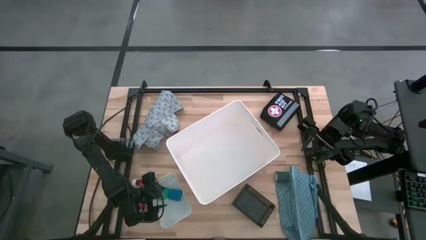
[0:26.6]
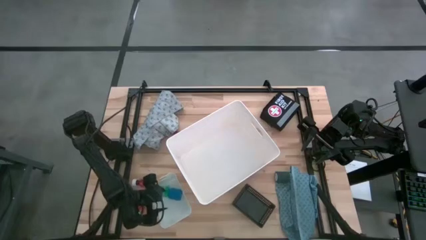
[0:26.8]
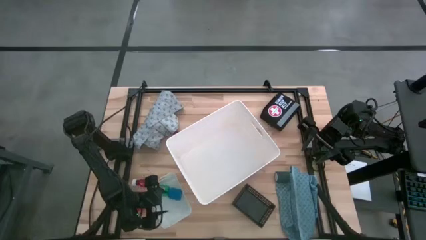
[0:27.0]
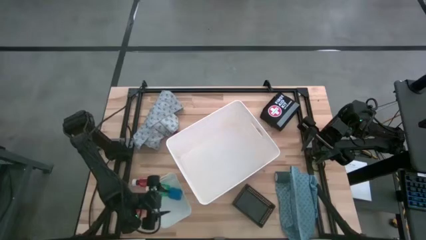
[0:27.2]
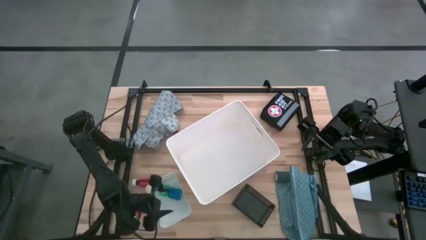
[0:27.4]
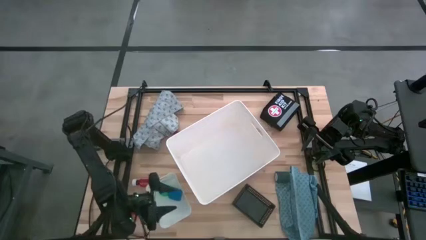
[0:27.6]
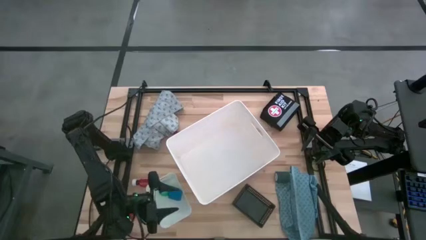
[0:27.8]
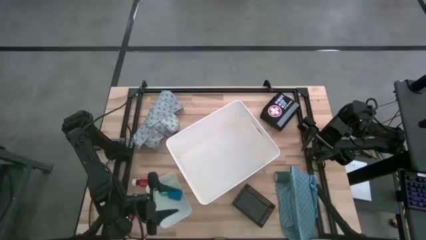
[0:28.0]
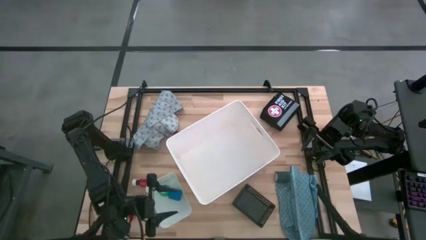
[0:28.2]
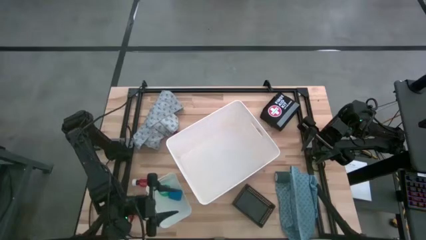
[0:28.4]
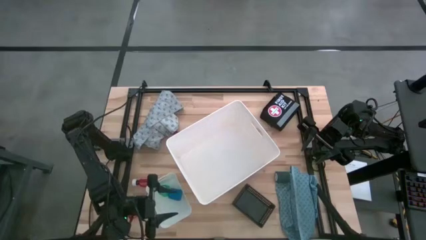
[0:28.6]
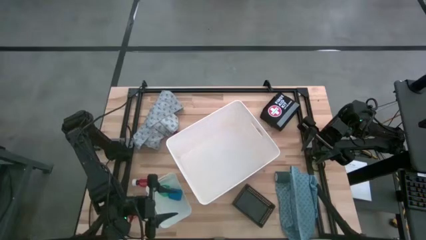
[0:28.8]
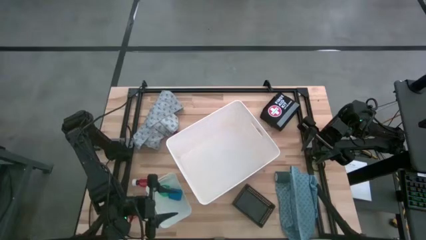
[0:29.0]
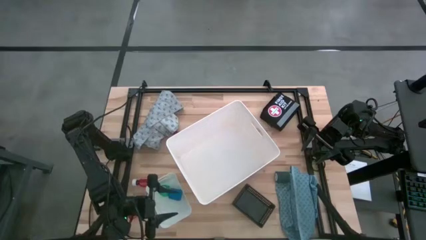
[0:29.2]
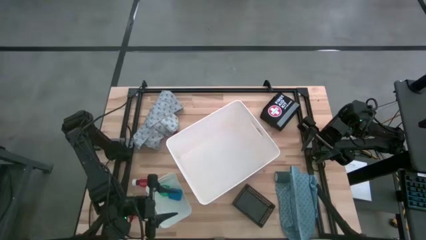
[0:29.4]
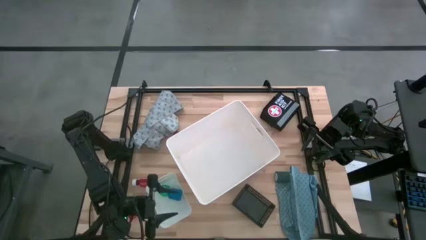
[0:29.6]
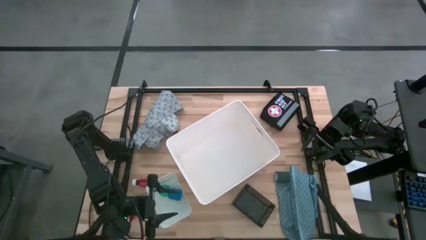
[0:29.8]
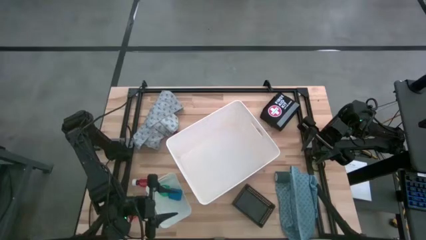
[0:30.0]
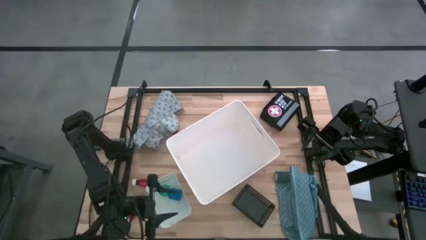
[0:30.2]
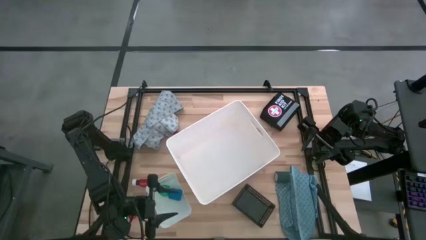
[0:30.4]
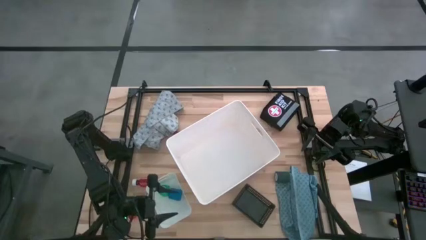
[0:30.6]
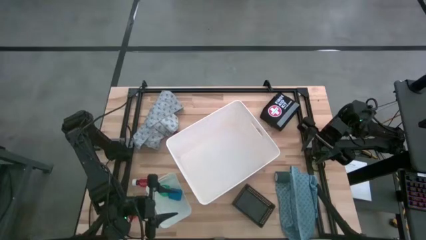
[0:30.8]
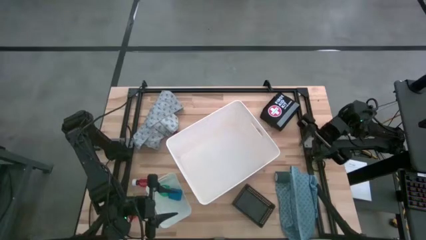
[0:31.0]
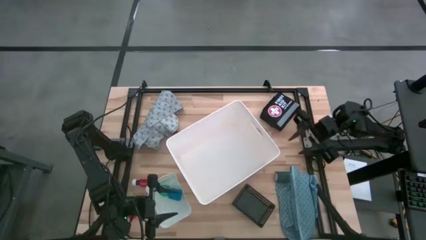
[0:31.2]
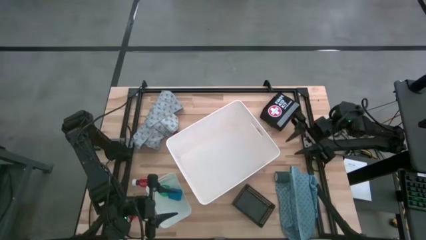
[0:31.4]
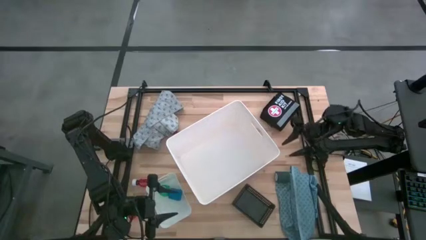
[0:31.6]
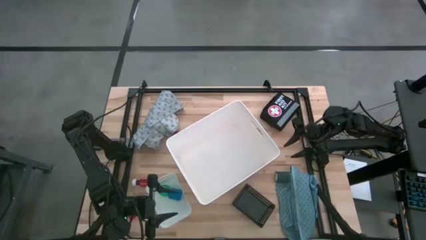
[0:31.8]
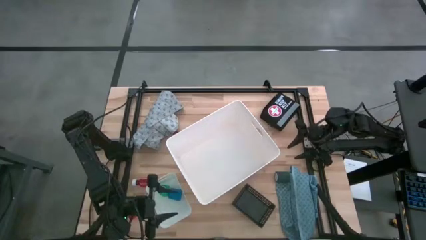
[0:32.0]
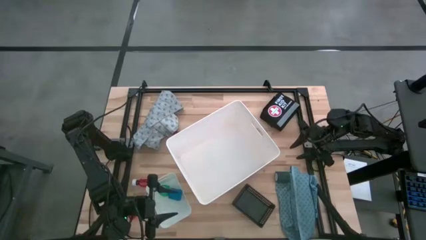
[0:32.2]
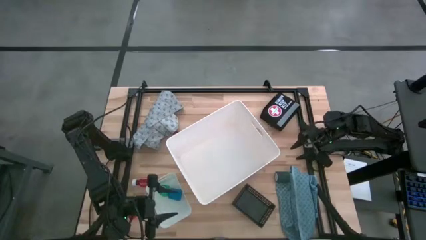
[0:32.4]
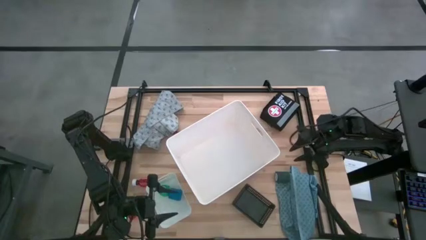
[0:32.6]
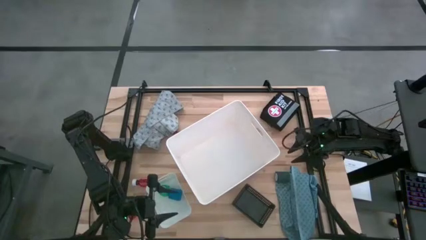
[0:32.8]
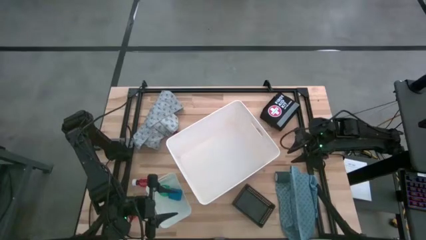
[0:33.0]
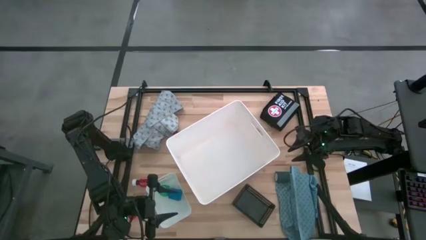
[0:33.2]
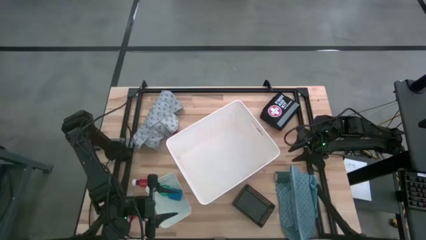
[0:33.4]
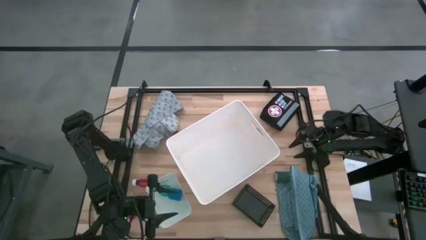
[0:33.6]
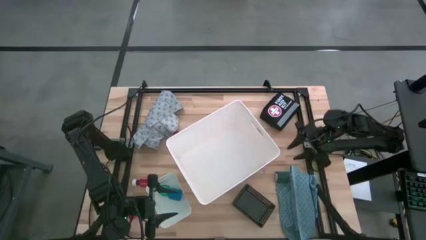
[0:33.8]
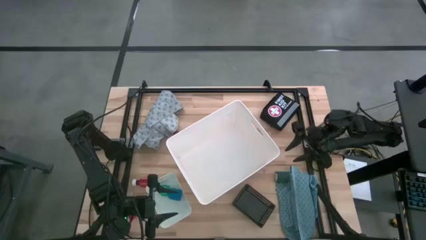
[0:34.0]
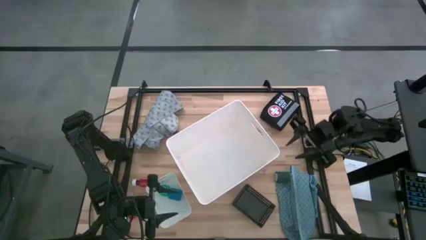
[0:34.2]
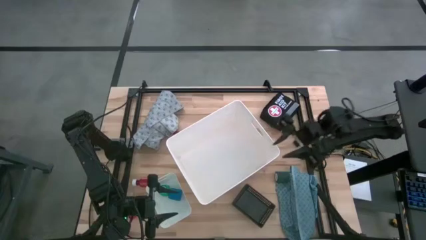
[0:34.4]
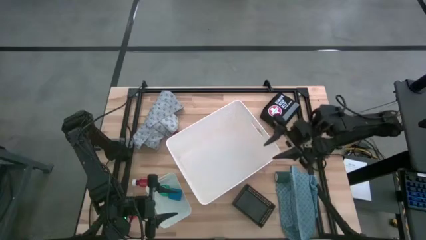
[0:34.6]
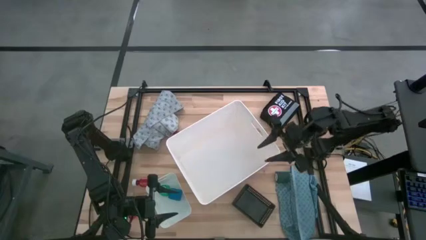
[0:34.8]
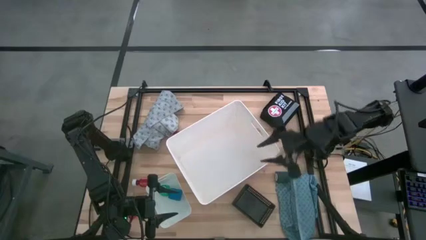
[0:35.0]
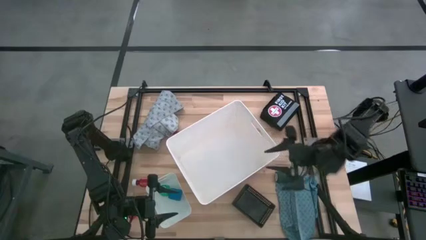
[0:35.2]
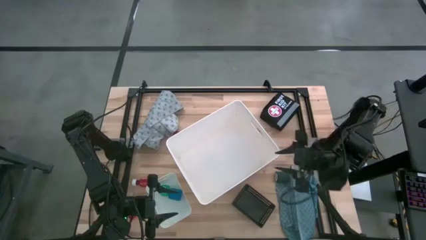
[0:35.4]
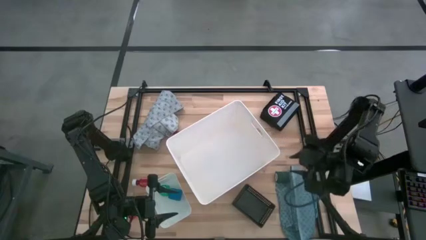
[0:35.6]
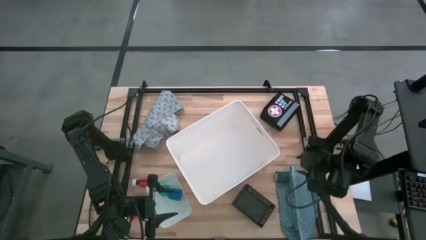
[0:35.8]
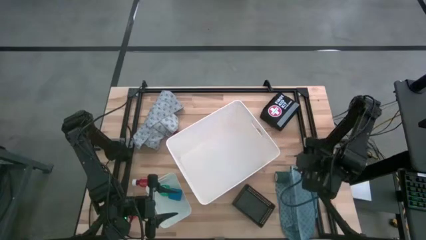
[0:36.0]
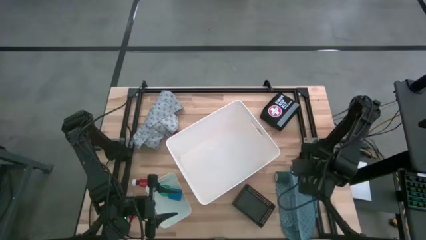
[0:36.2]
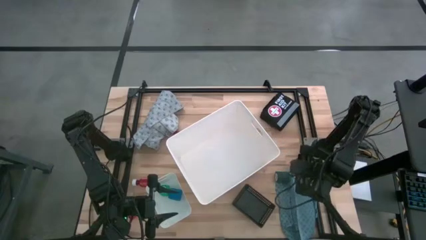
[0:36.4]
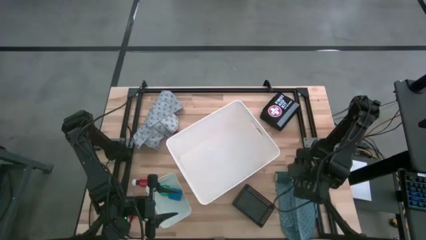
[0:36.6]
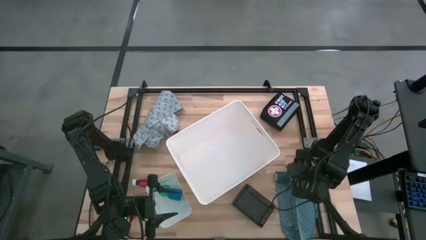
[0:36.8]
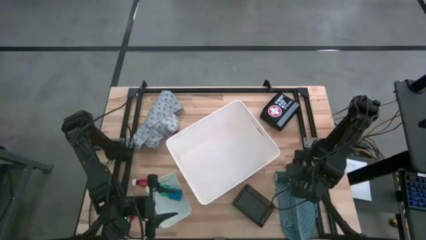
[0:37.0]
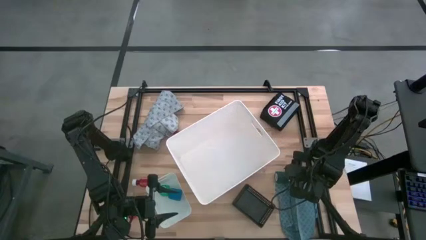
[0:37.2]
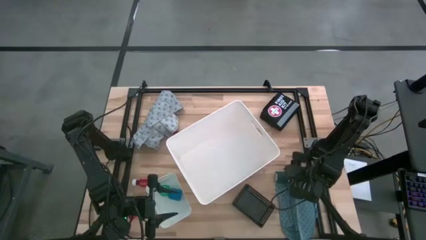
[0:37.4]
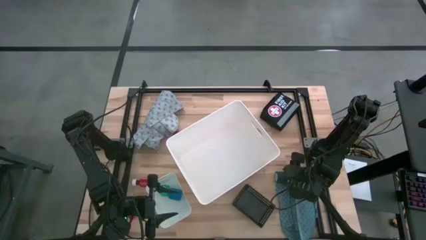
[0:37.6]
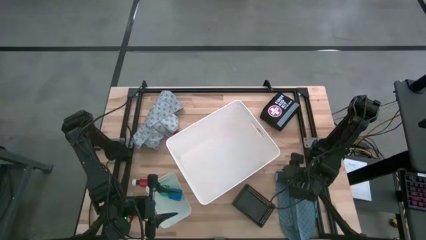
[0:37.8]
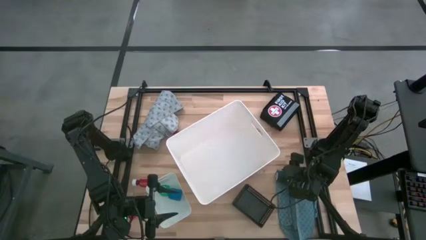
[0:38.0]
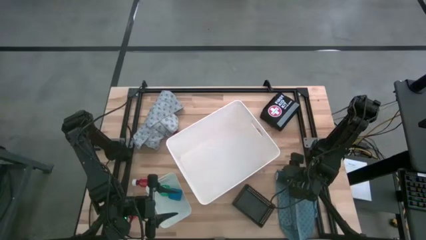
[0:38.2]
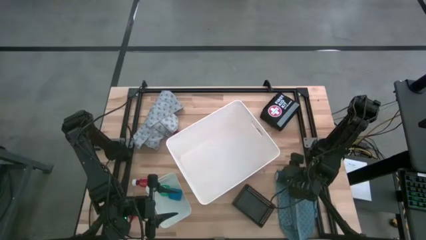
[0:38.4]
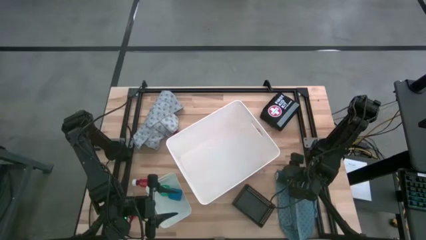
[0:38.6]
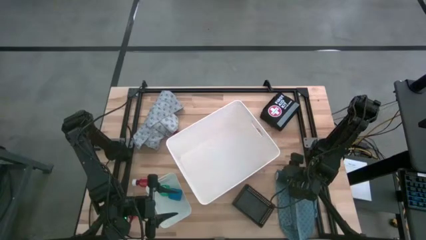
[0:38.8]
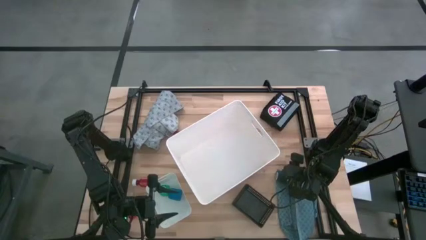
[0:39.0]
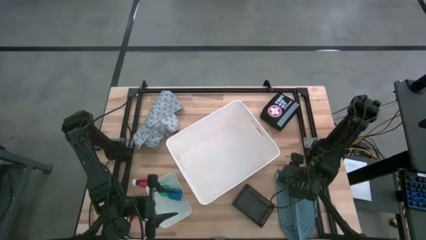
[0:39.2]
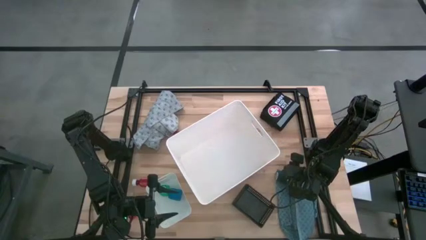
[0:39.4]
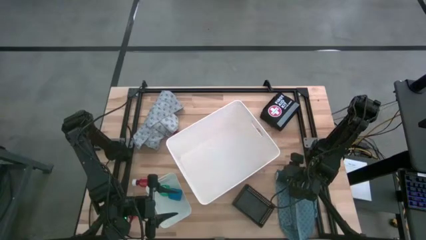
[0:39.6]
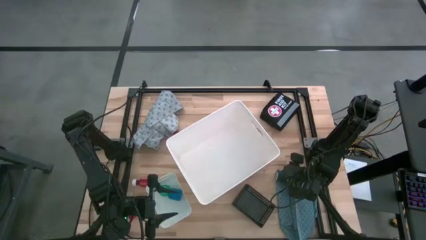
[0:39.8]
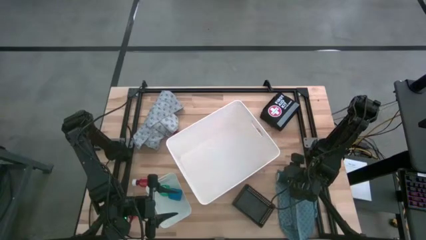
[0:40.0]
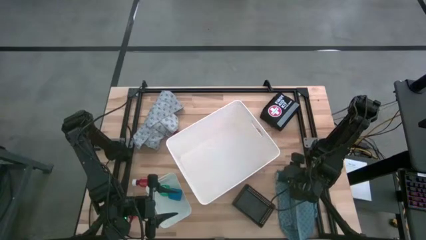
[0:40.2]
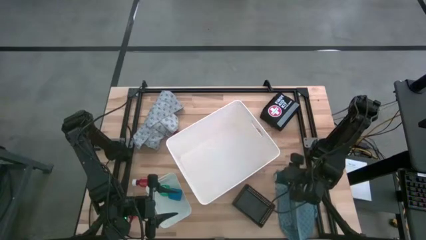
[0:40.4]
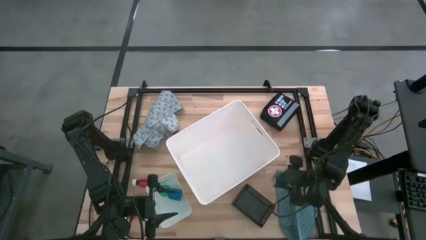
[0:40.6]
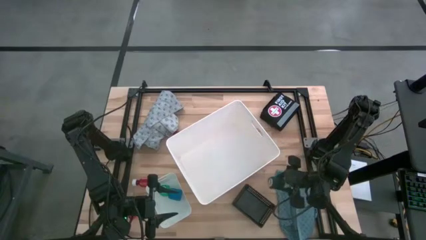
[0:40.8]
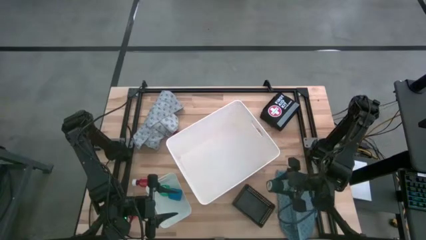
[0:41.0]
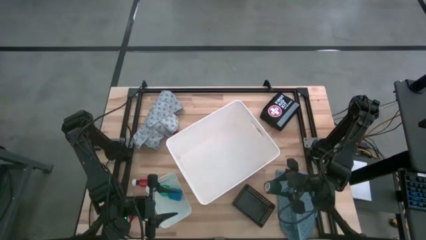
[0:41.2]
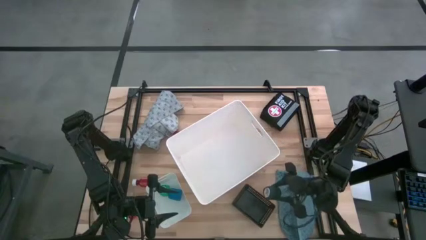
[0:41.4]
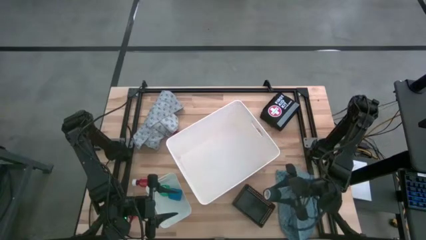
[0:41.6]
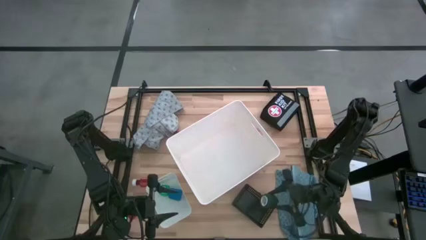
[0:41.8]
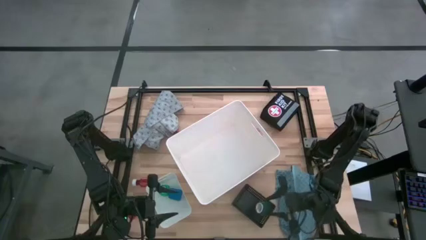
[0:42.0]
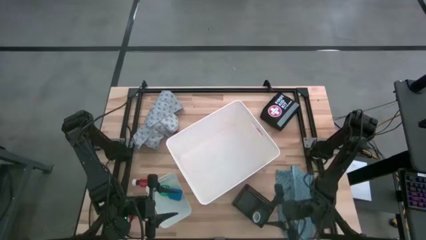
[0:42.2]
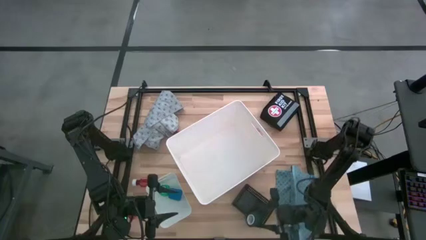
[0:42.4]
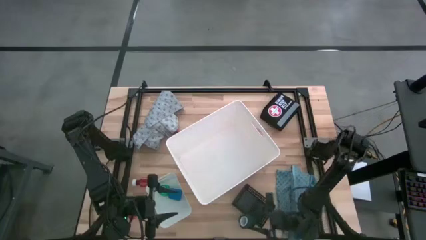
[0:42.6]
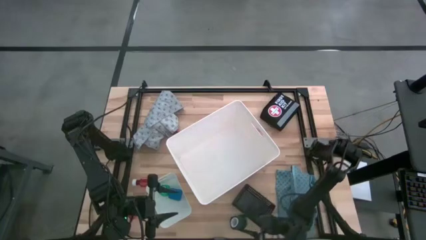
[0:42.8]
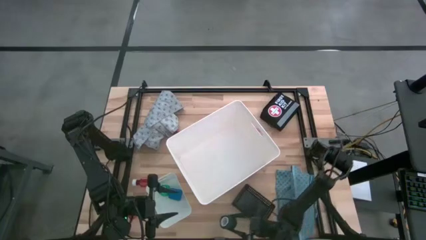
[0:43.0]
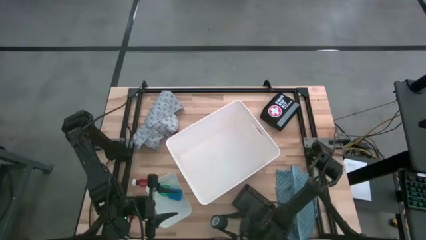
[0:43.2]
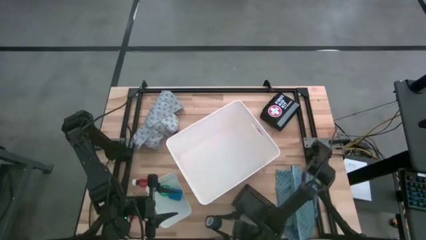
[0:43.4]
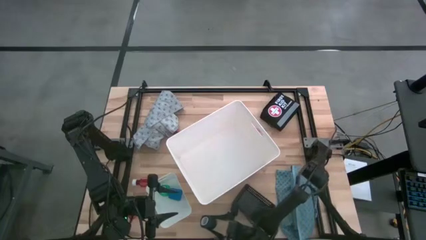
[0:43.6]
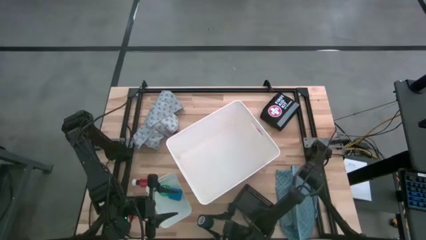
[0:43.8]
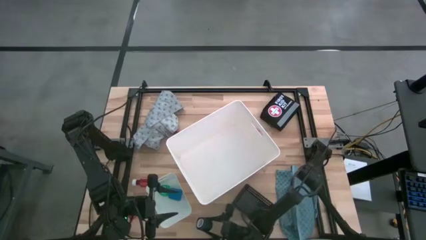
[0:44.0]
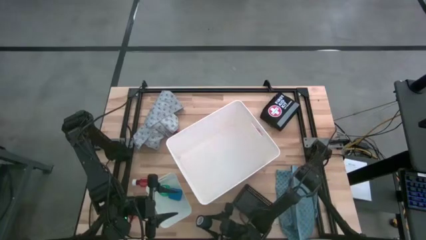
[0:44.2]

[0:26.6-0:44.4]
Task: Pick & place medical supplies in basket/bin
Put the dark green bandage into the white bin
